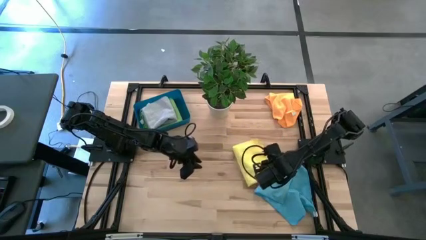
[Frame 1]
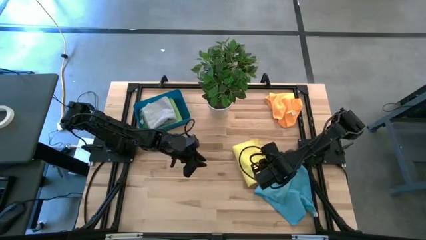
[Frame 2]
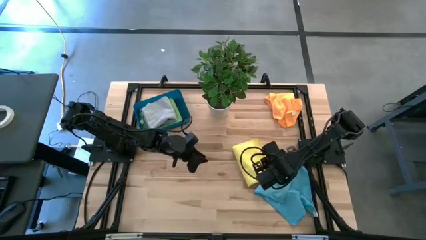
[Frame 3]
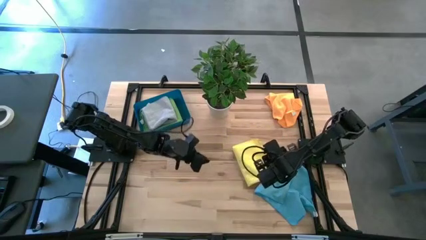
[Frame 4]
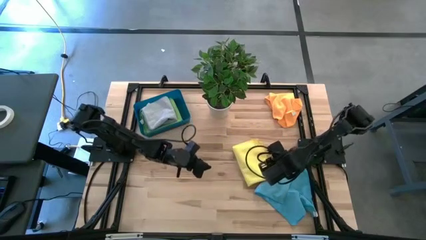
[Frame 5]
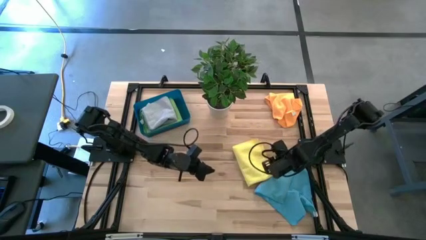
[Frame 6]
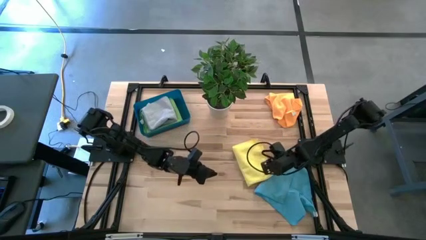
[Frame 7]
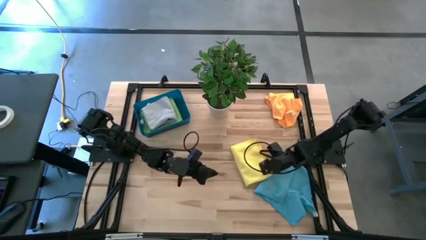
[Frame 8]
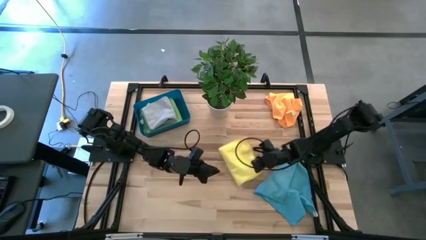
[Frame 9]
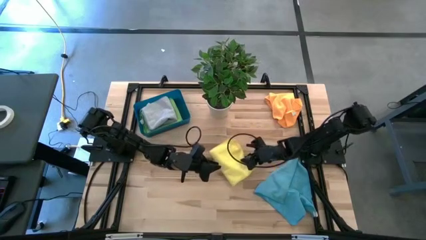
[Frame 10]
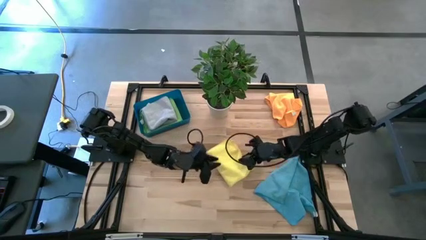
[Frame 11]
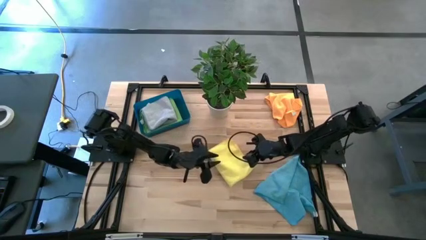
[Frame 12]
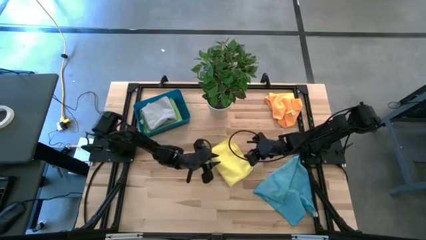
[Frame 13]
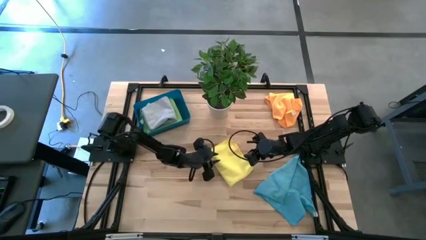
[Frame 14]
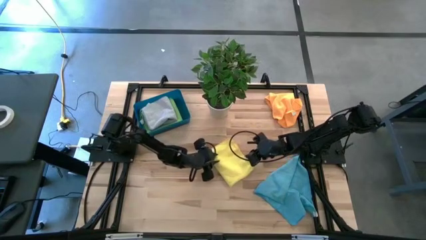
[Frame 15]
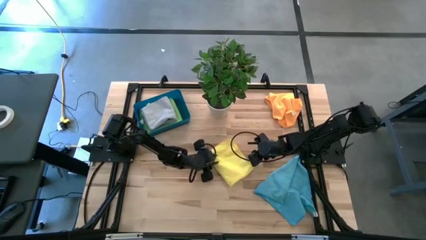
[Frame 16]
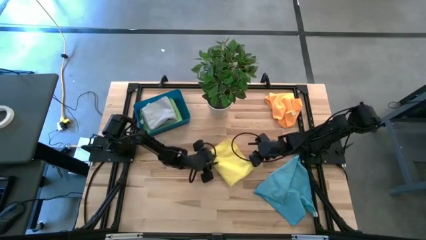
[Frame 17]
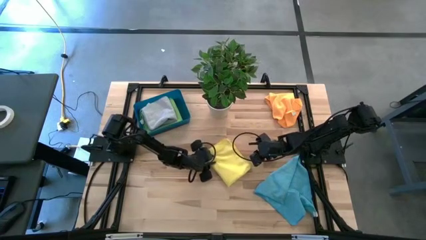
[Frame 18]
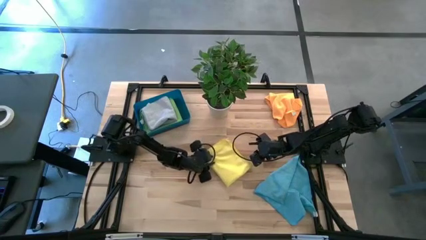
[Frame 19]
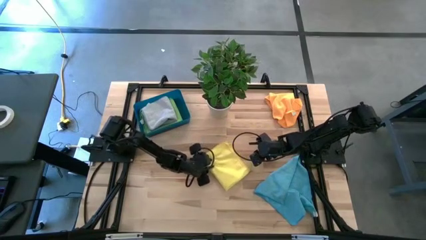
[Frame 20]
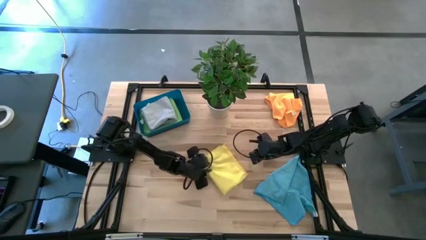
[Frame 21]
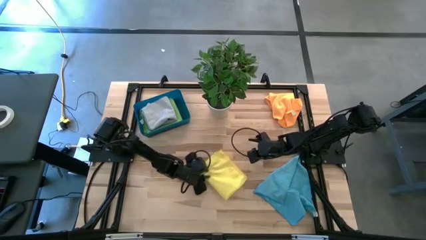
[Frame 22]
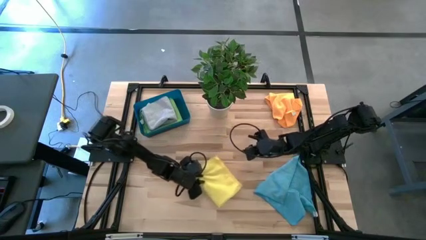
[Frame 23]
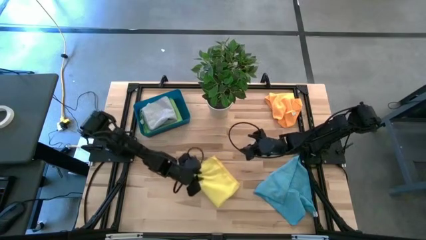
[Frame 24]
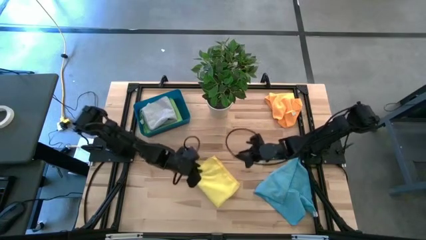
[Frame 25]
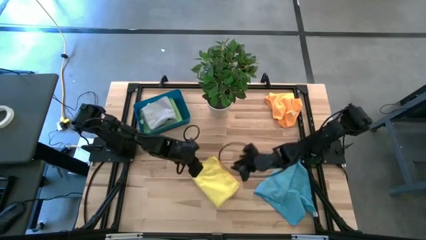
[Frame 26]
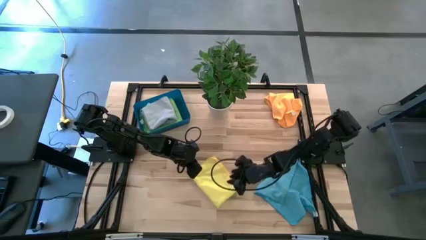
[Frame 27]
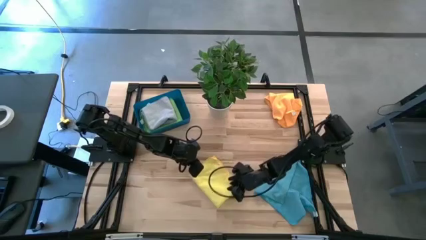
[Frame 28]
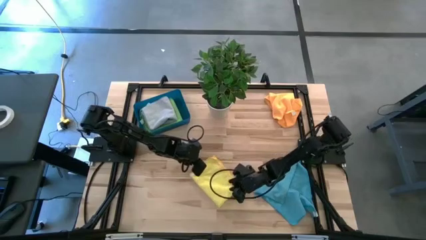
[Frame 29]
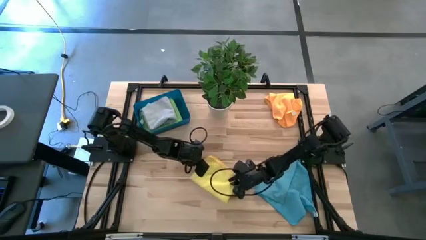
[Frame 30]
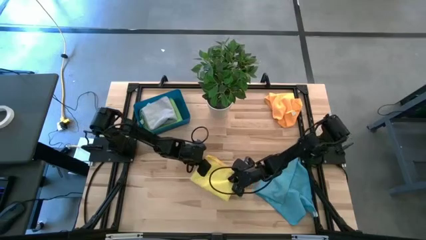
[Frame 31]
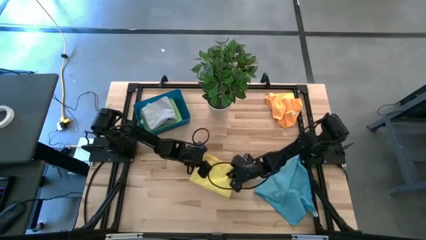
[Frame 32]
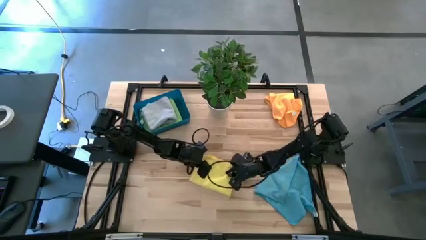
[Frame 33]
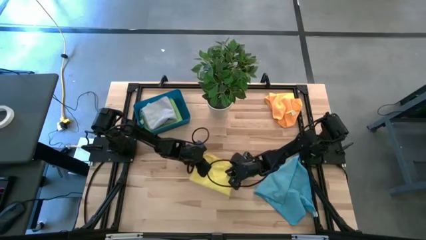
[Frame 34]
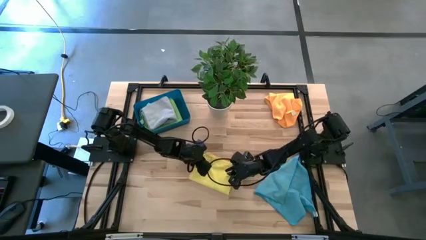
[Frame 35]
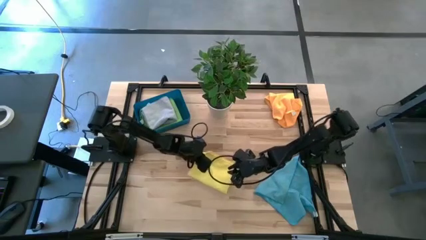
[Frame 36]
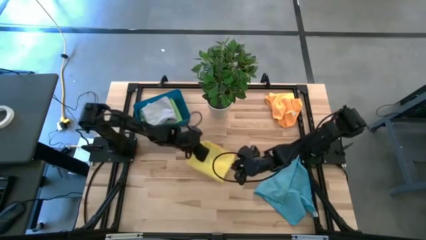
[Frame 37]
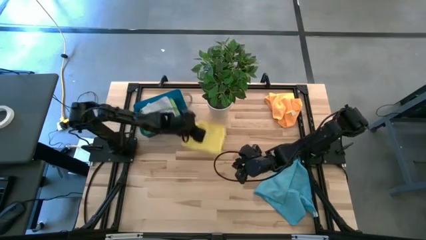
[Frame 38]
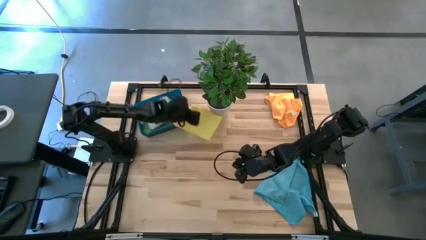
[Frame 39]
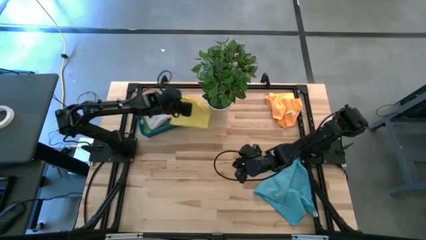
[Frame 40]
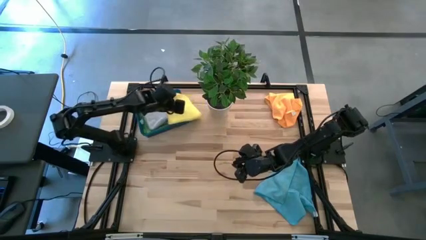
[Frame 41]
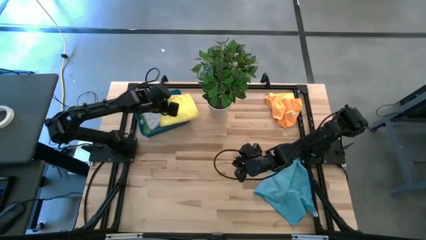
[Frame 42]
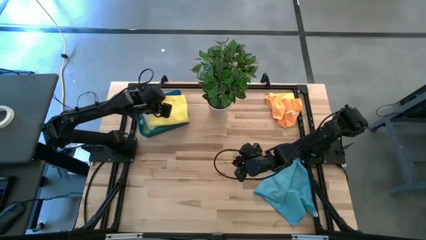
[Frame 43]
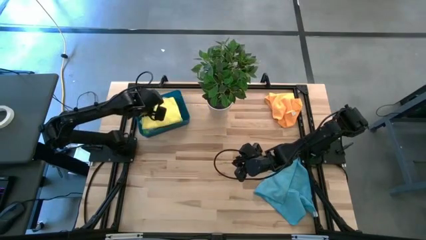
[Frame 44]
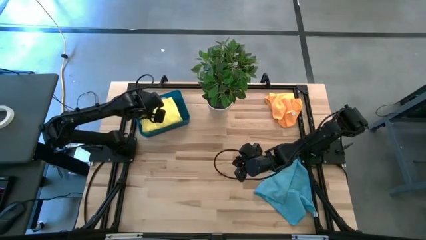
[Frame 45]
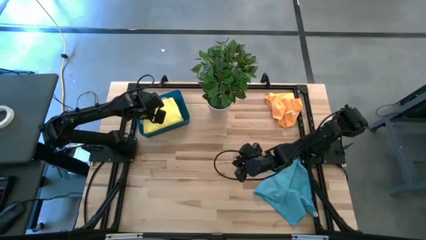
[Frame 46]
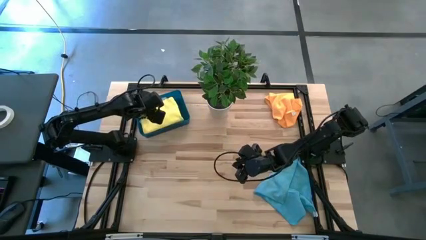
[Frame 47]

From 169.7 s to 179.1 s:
Task: Fold microfiber towels
Put the yellow towel into the blue bin
